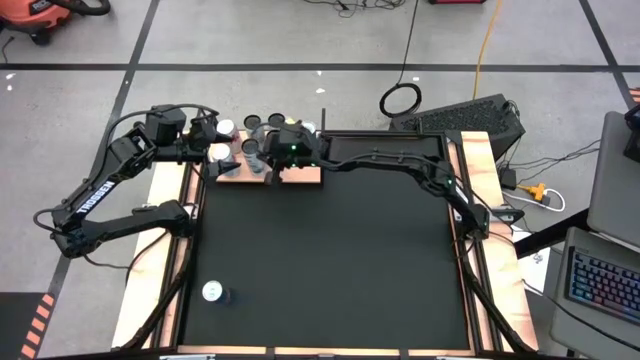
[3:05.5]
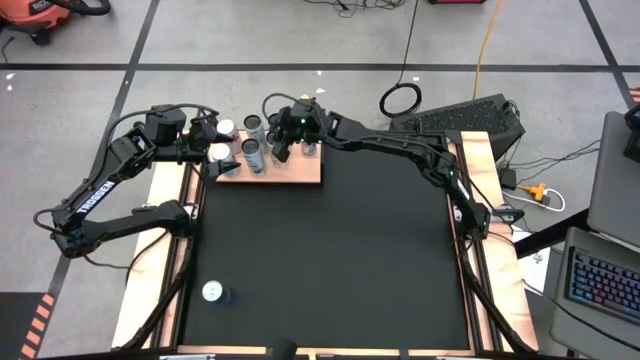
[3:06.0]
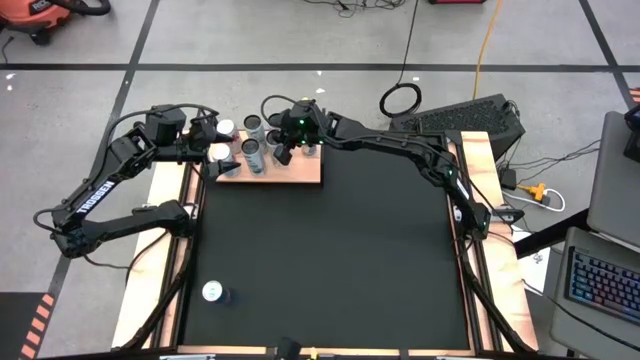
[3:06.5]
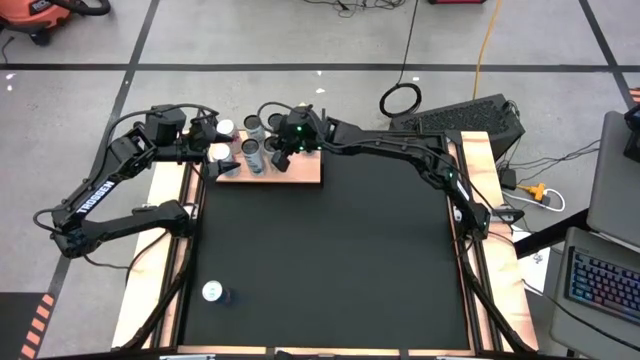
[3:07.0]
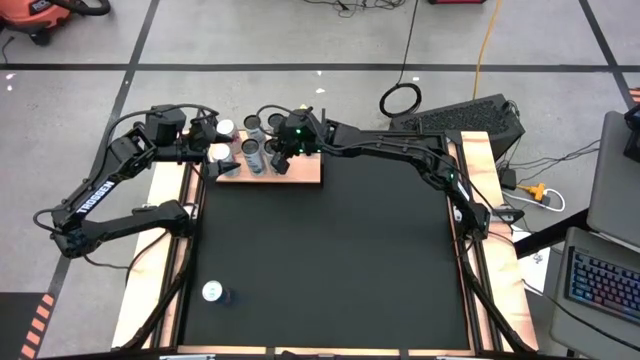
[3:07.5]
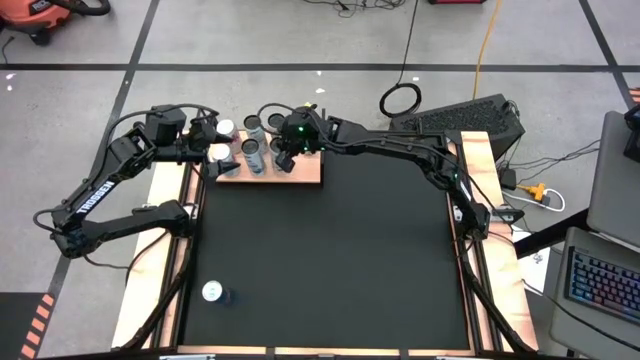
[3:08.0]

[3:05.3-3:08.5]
Task: Place canned beverage on shelf
Adjust the white yellow soda can on the shelf

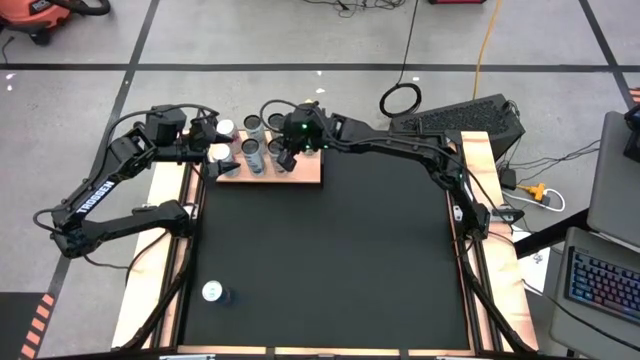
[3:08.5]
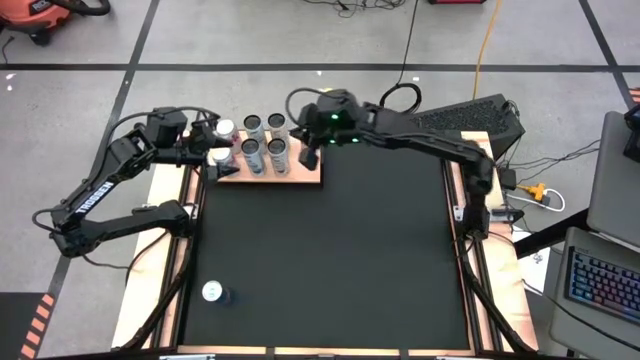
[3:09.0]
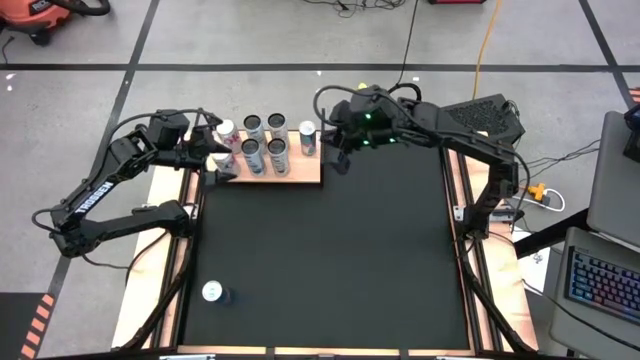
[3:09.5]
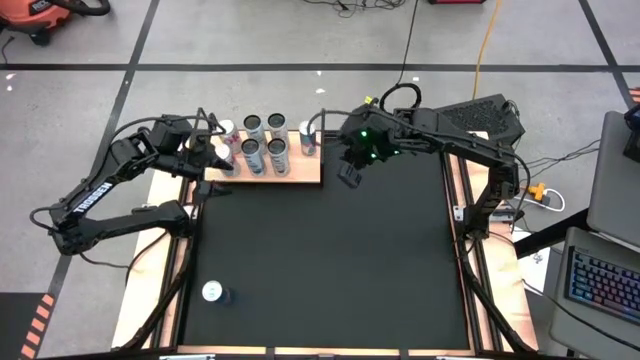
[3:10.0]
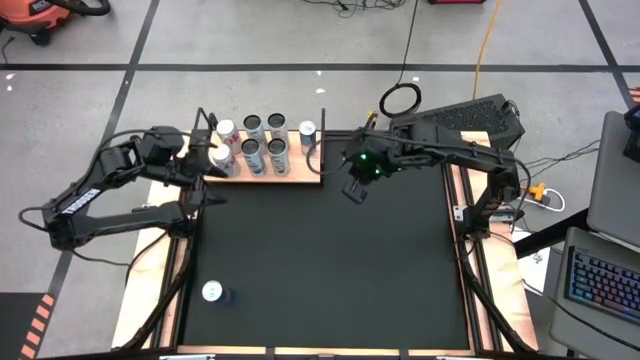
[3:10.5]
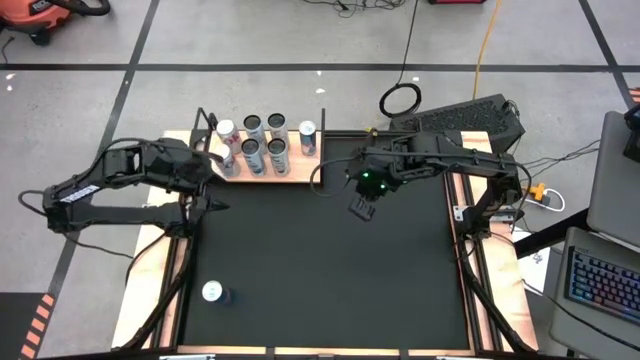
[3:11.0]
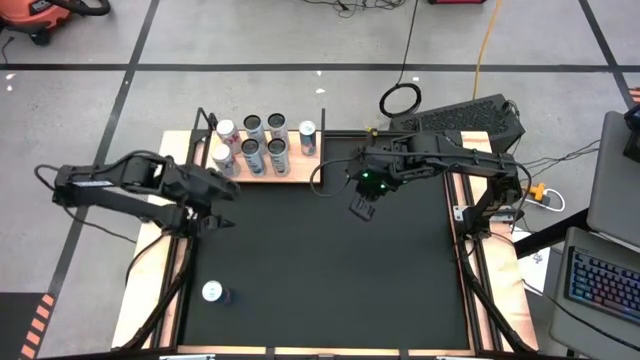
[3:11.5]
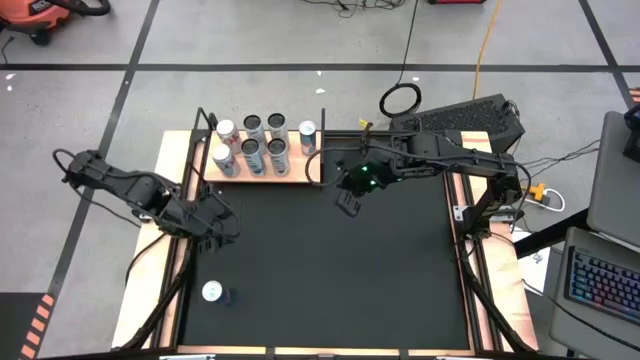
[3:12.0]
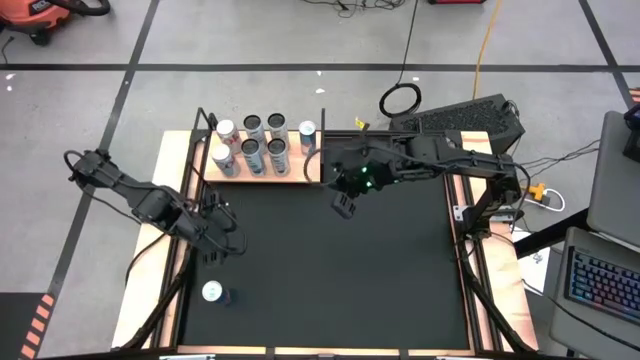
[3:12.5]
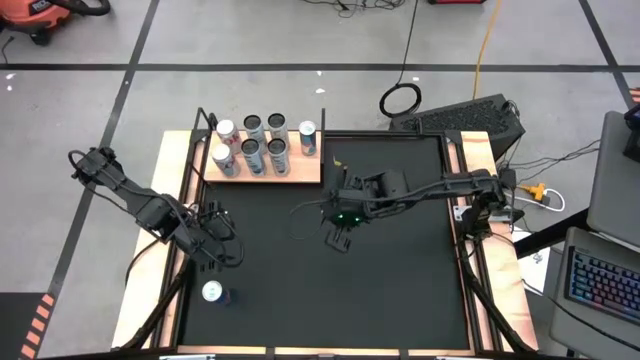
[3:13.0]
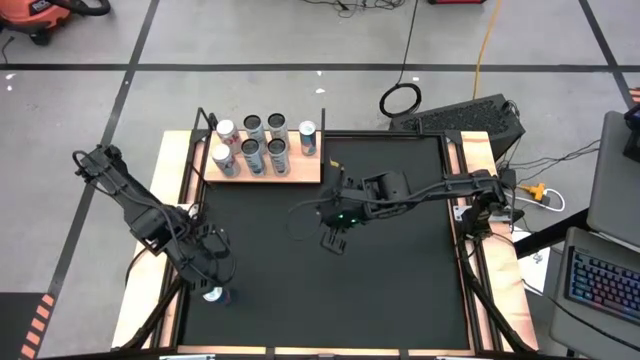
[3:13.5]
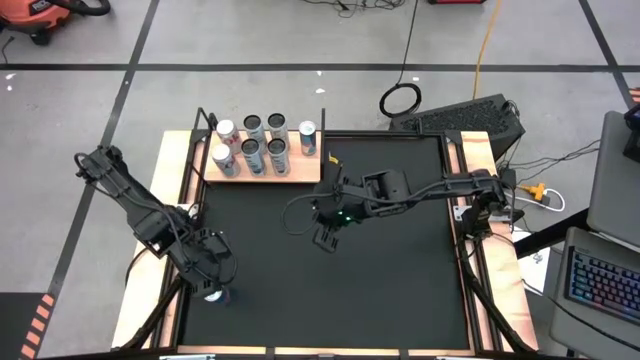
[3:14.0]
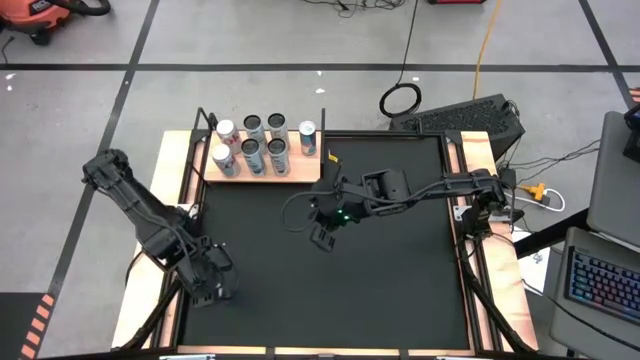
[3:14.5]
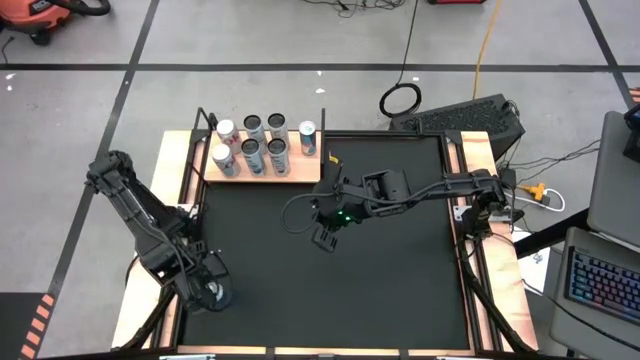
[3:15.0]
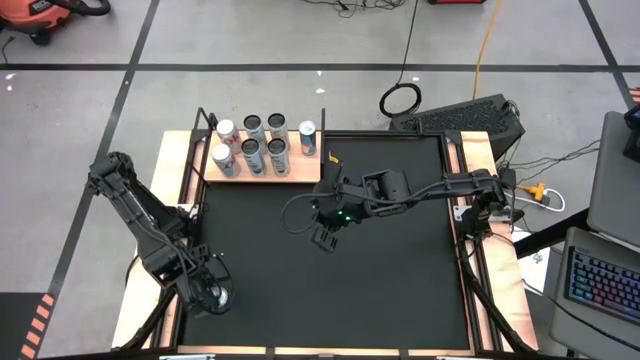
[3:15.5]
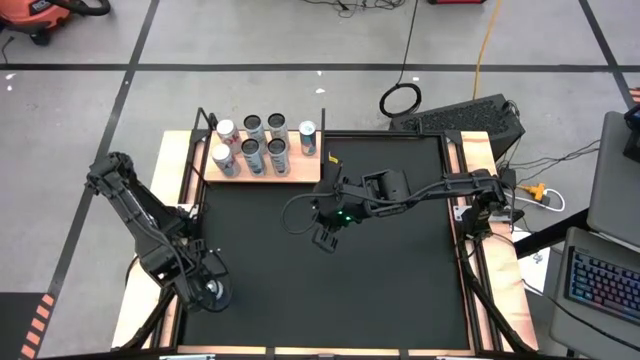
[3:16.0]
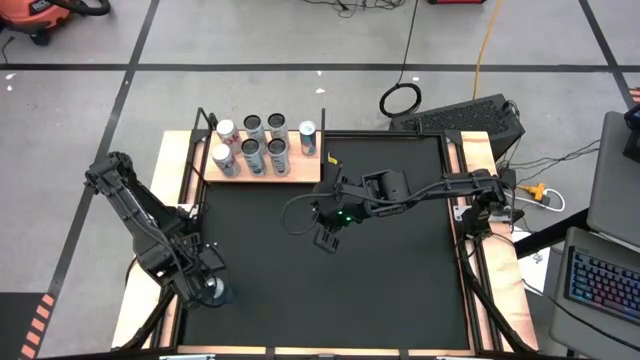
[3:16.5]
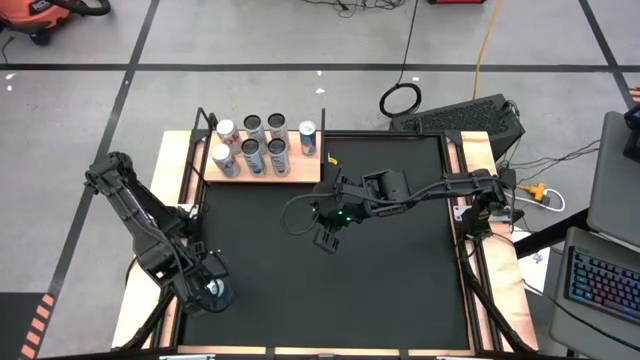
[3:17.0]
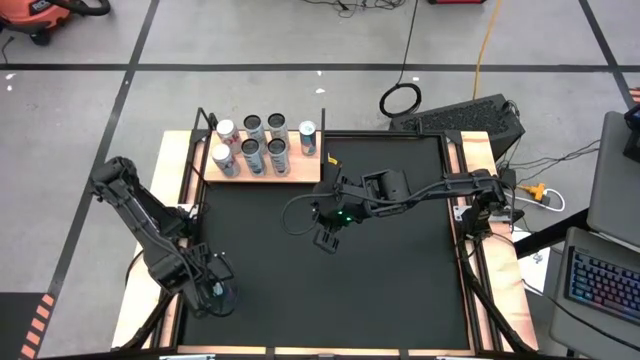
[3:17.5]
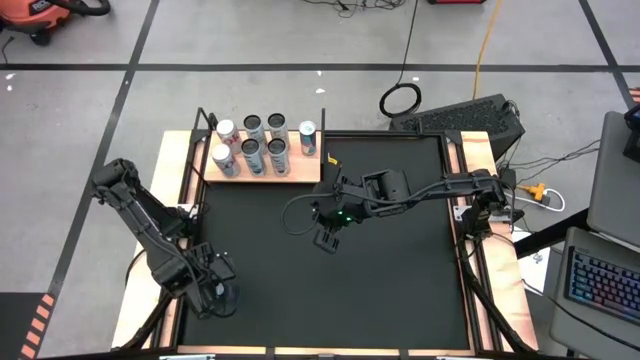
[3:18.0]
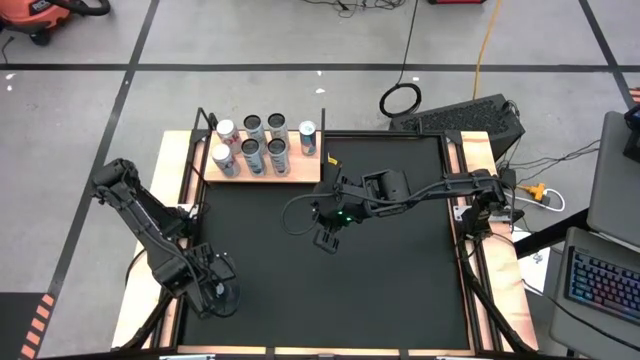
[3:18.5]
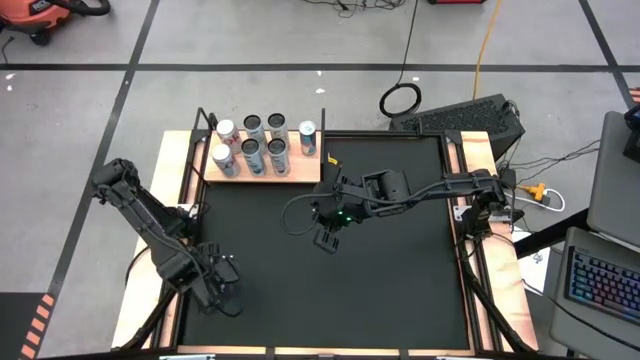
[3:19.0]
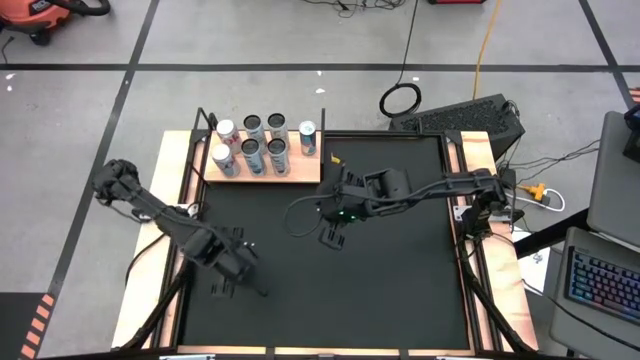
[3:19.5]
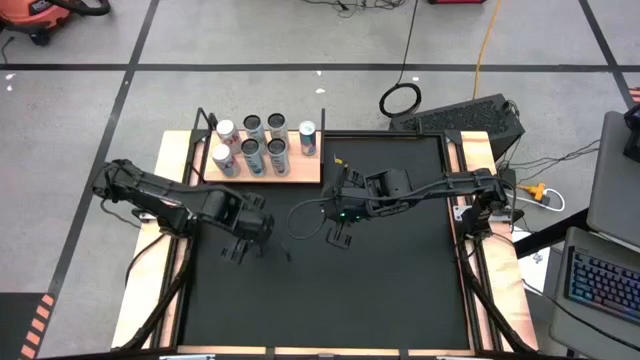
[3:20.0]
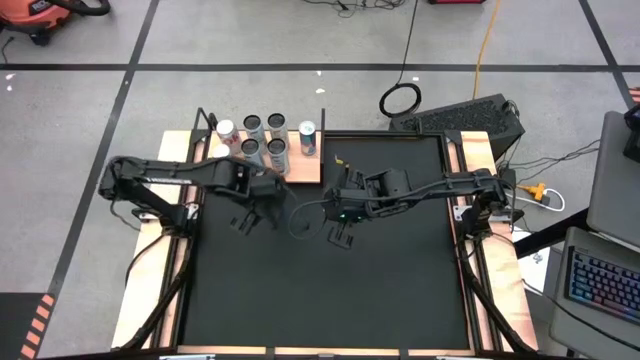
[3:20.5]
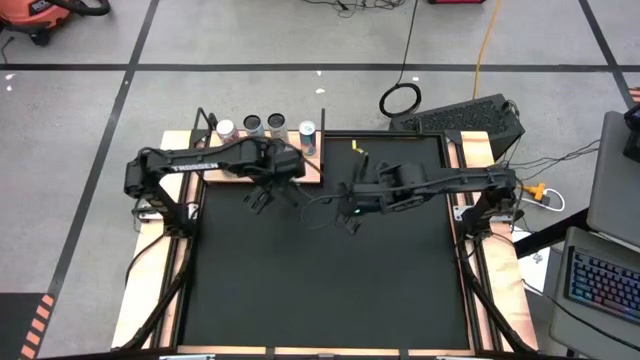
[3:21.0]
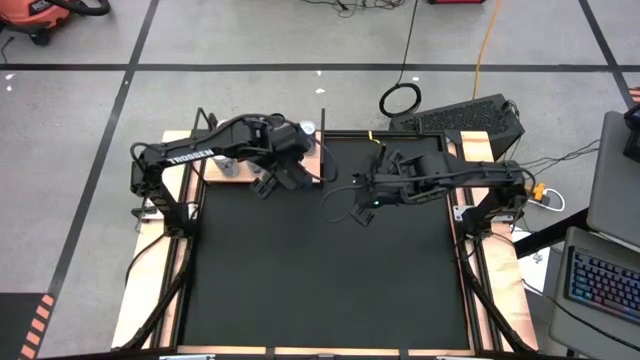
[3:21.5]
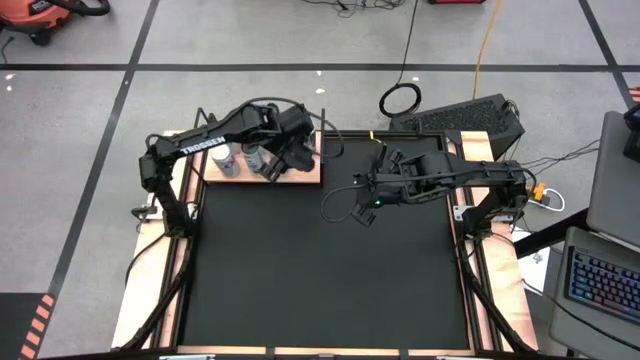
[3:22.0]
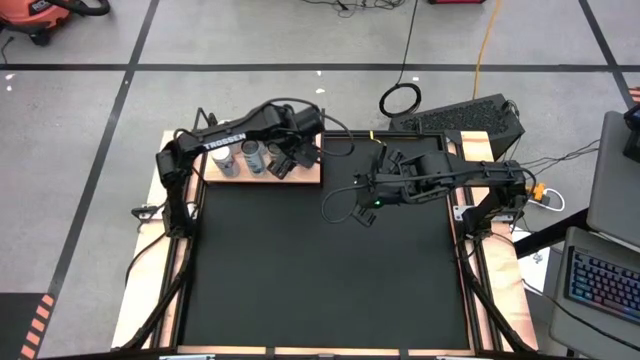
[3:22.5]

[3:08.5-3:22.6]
Put the blue soda can on the shelf aligned with the blue soda can

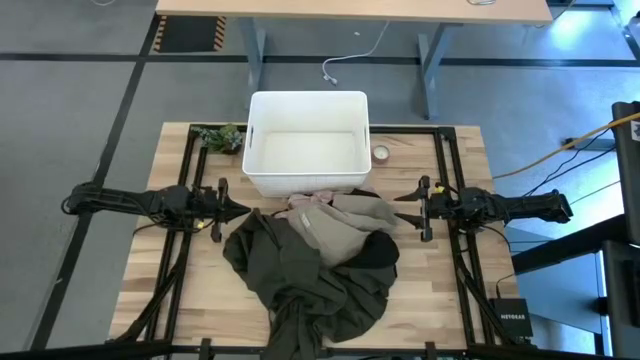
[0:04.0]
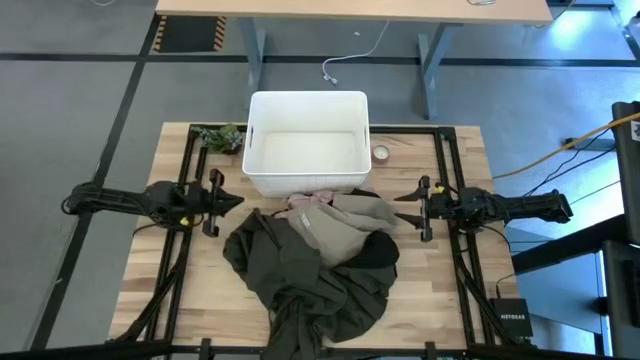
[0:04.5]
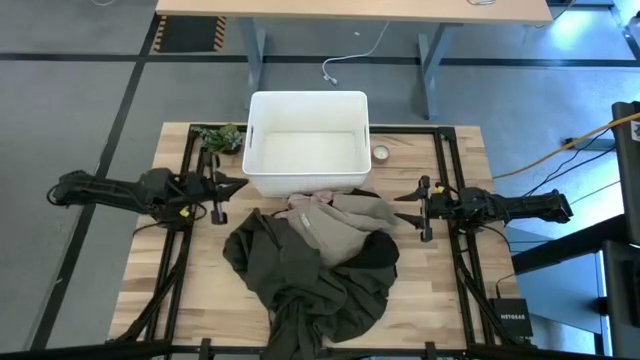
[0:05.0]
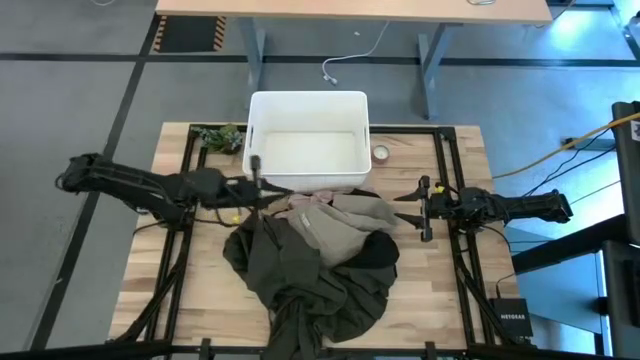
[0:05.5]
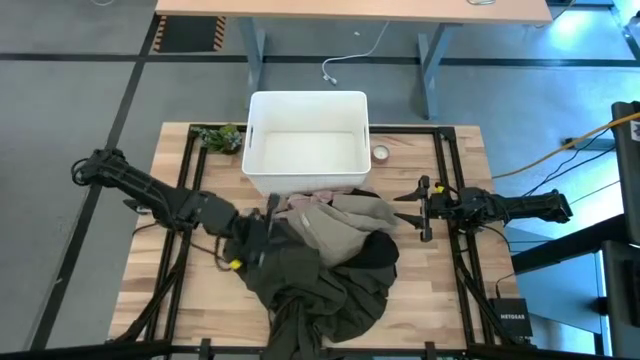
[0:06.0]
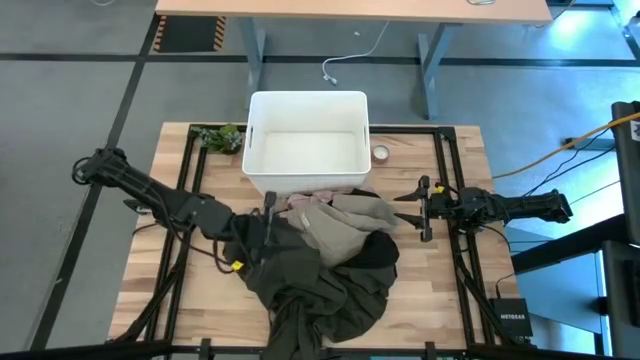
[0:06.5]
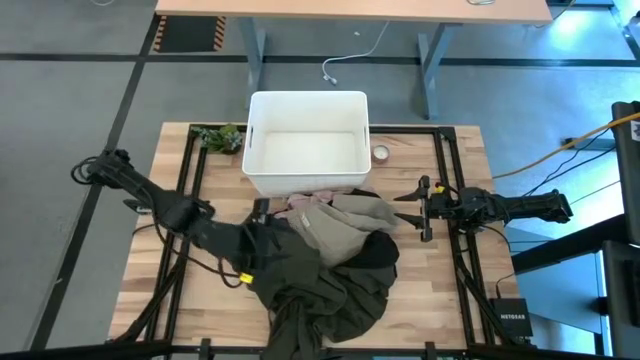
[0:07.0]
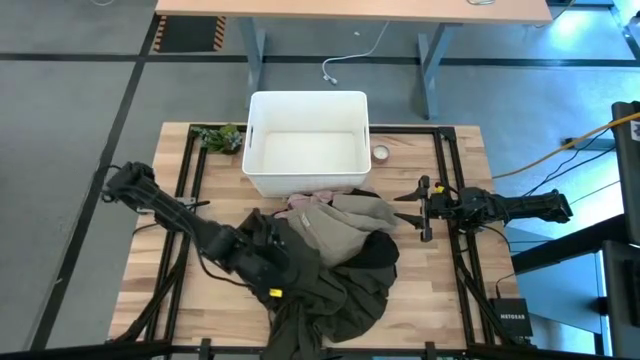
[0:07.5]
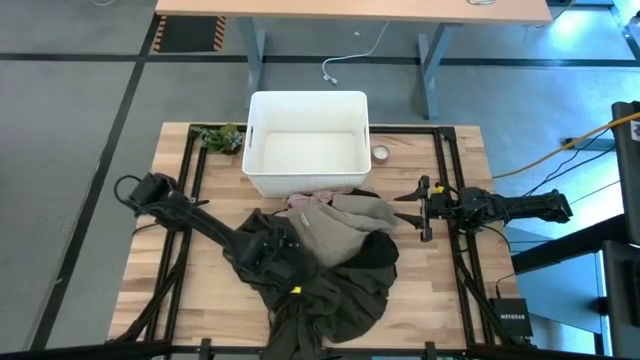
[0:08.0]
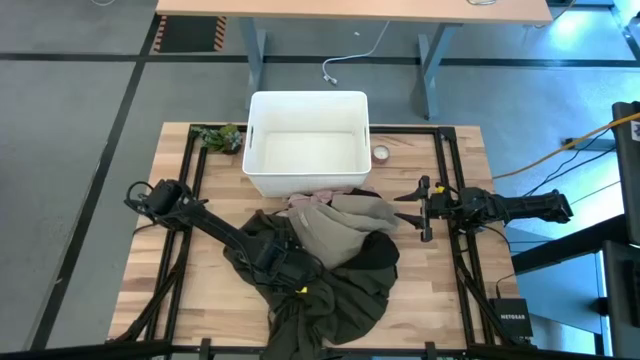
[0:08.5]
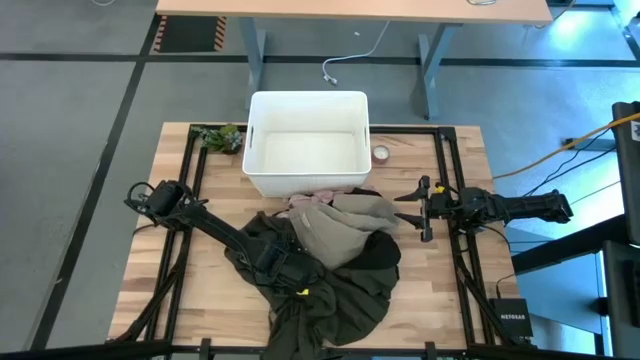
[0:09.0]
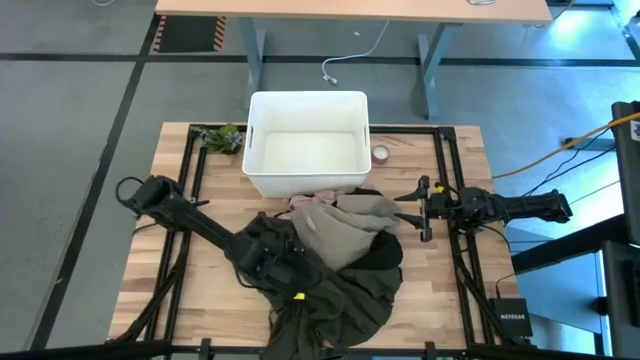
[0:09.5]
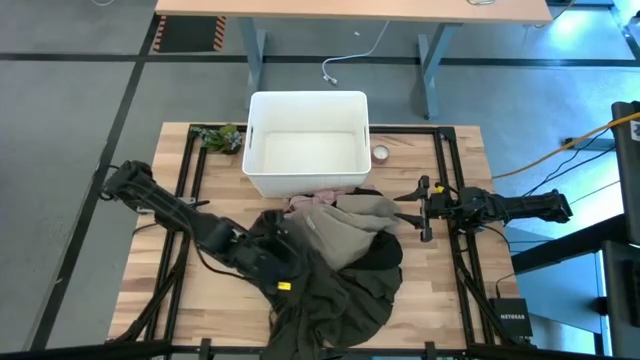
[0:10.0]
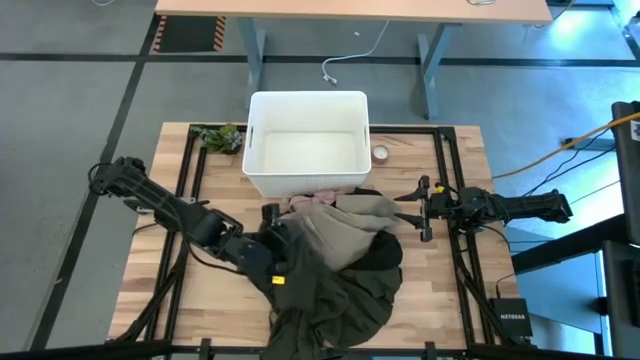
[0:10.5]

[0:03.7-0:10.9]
Task: Sort clothes
Put the black jacket into the white bin
